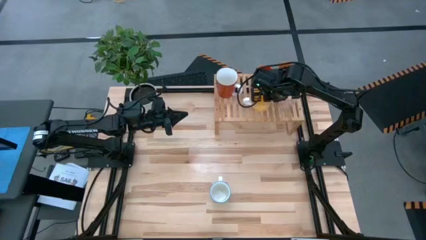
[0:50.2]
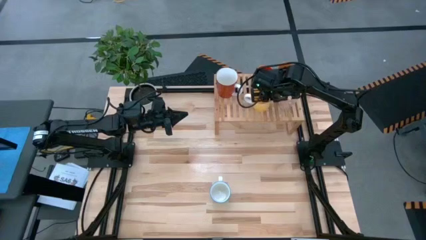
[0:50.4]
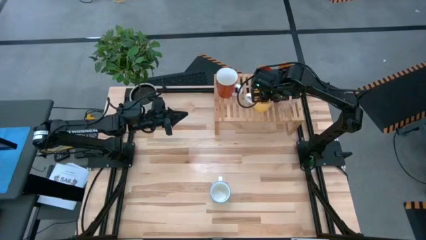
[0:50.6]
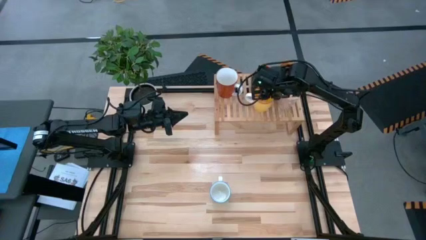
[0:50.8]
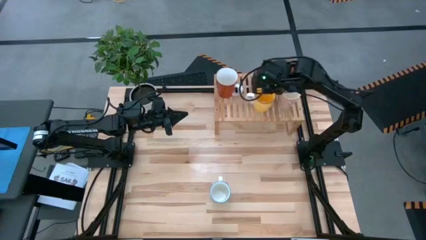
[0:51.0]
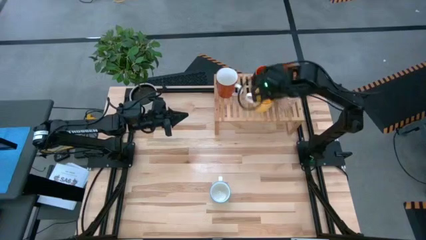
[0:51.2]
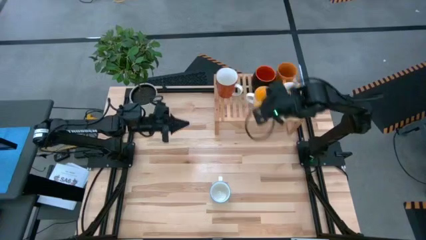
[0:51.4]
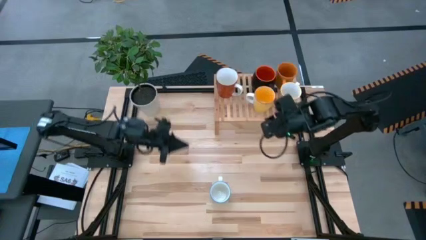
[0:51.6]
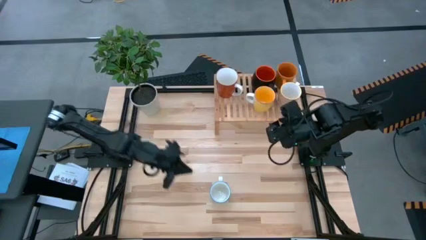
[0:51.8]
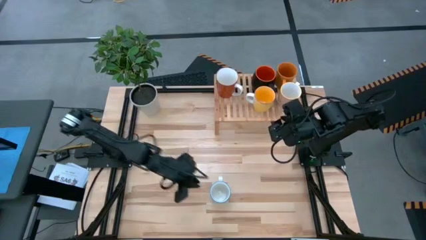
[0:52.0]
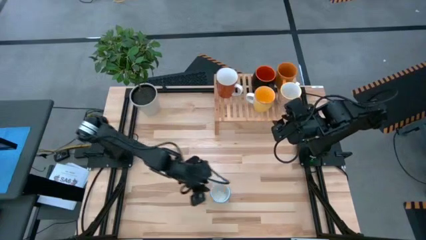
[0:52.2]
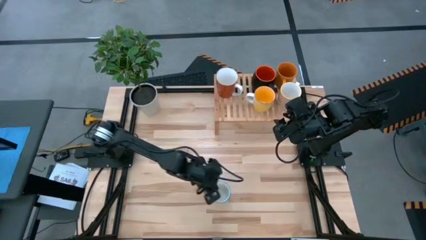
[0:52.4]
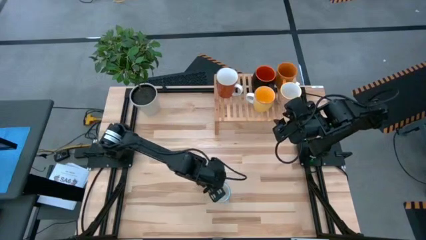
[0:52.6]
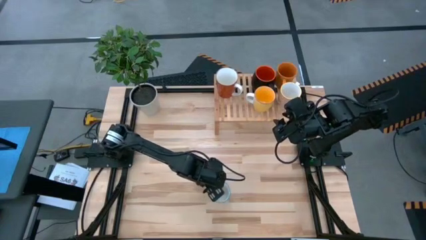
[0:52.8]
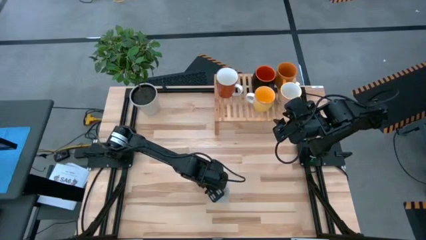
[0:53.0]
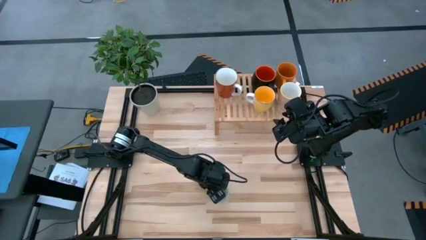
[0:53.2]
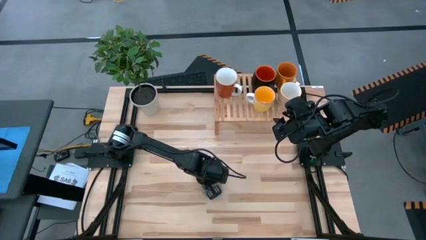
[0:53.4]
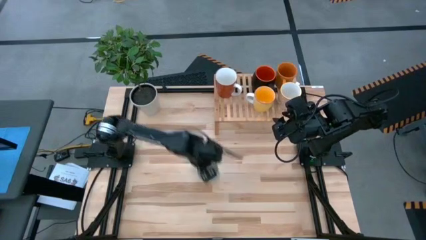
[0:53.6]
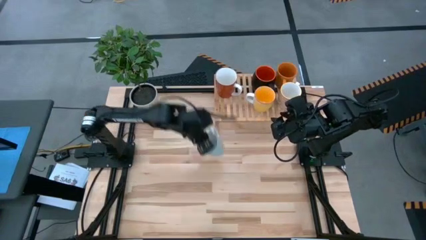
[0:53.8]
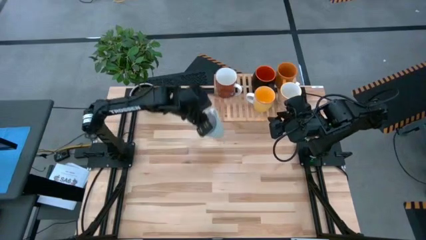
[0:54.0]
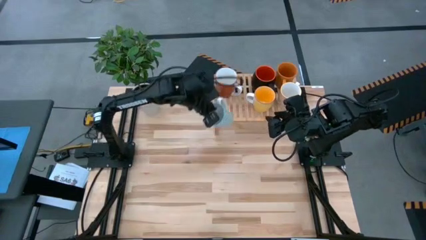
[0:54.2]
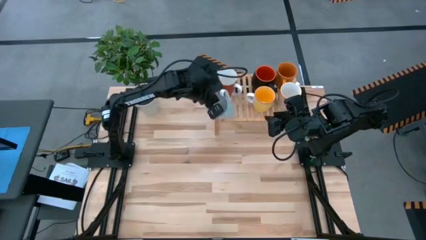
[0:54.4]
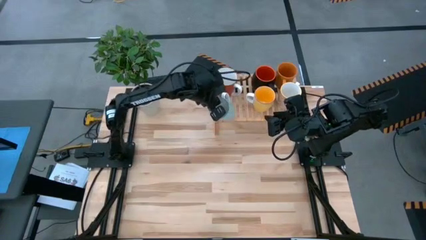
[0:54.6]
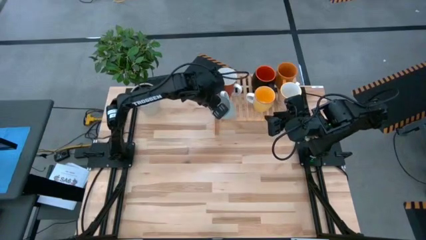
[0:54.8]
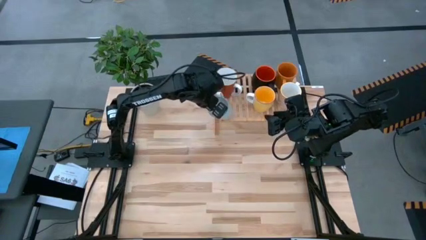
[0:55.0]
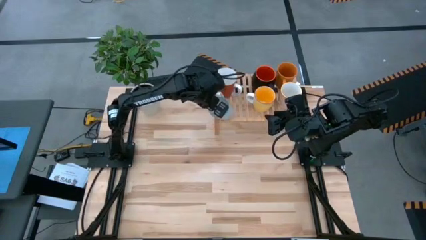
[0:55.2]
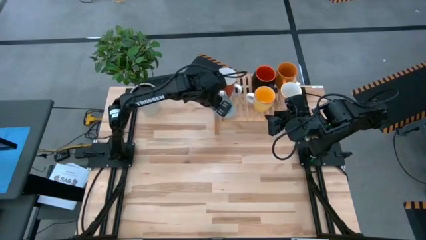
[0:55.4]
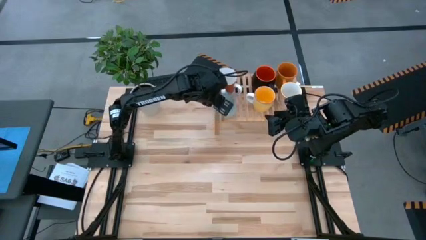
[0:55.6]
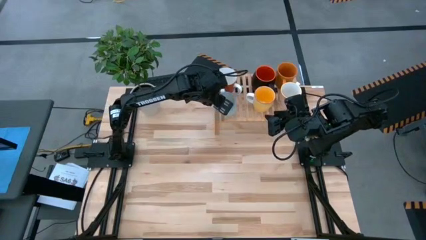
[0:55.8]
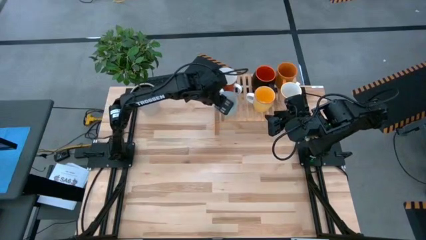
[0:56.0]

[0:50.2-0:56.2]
Task: Place coffee mugs
Put the green patterned mug on the shelf

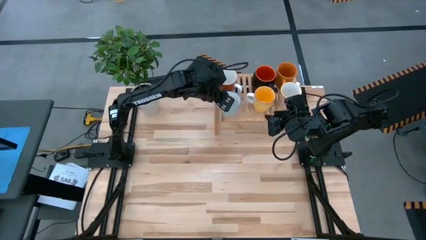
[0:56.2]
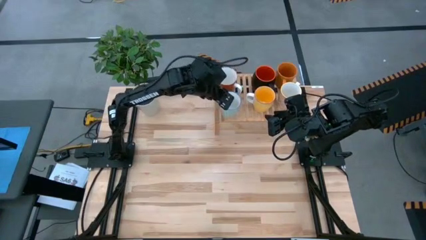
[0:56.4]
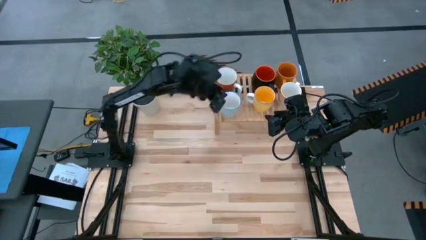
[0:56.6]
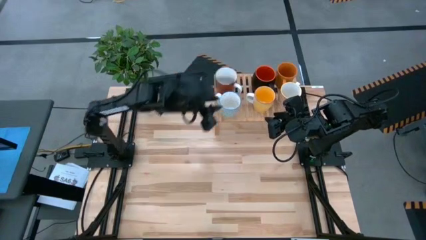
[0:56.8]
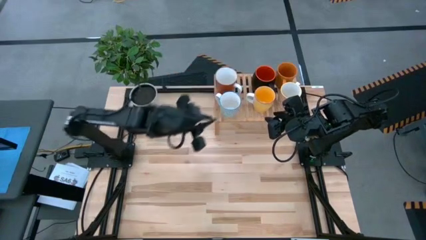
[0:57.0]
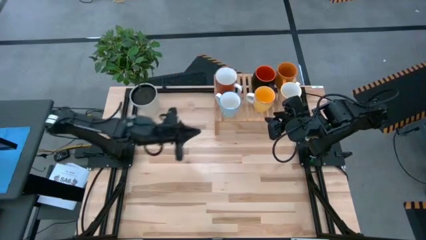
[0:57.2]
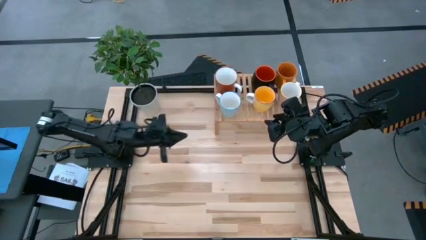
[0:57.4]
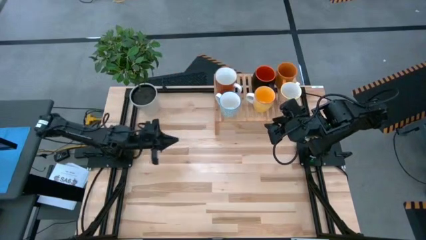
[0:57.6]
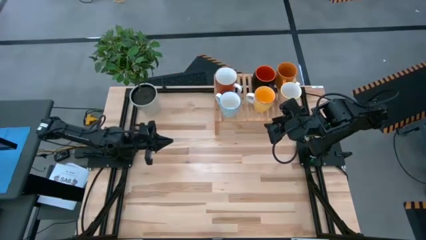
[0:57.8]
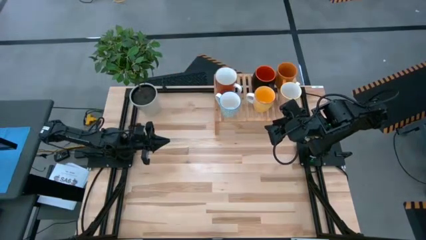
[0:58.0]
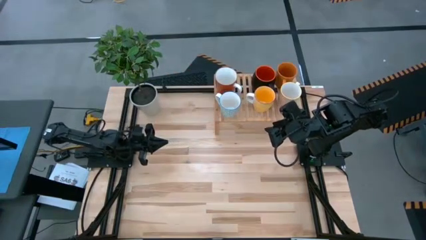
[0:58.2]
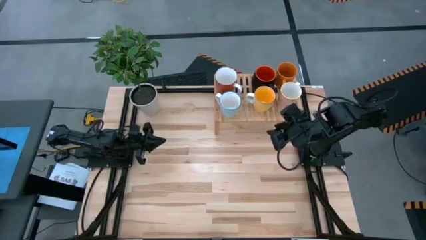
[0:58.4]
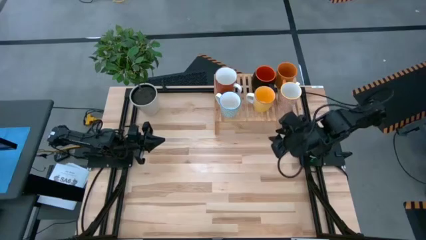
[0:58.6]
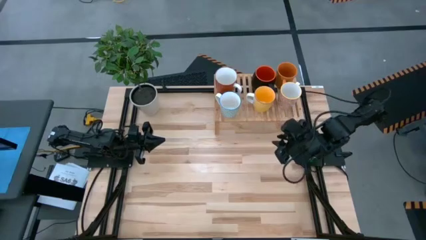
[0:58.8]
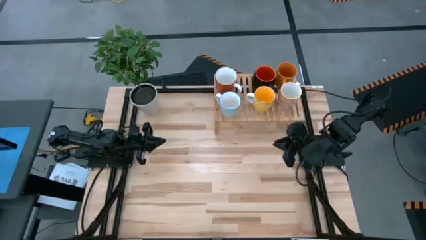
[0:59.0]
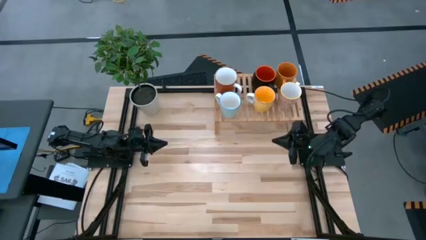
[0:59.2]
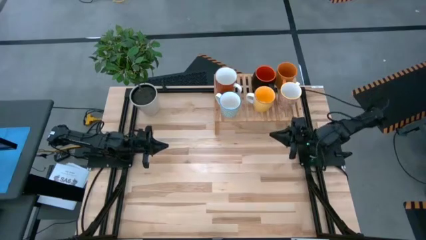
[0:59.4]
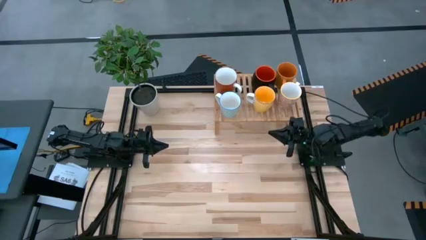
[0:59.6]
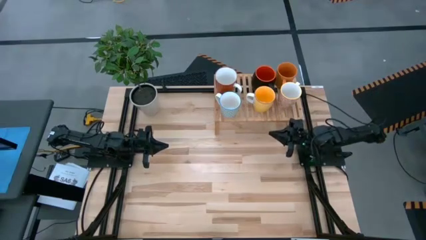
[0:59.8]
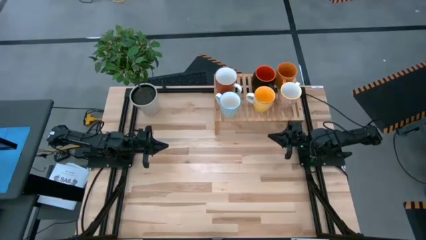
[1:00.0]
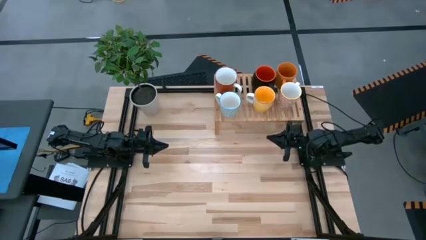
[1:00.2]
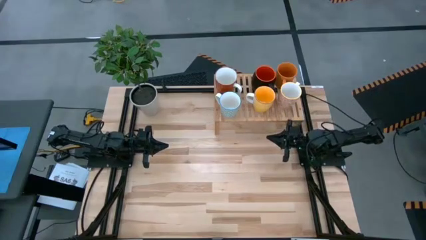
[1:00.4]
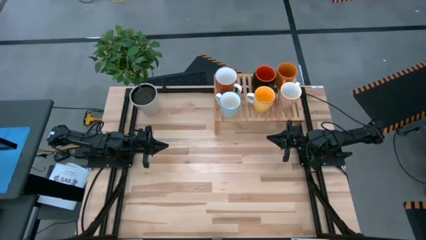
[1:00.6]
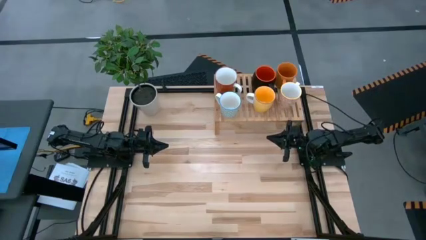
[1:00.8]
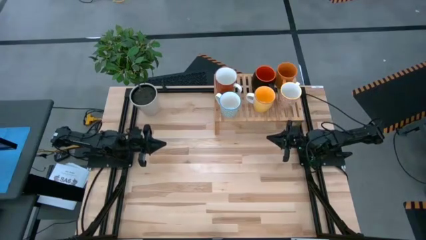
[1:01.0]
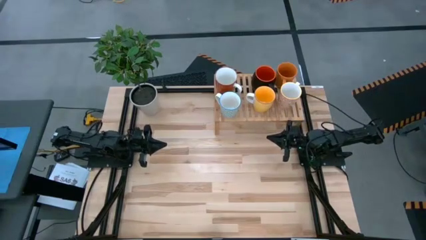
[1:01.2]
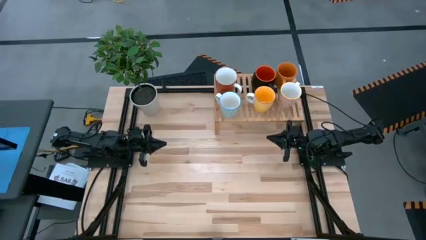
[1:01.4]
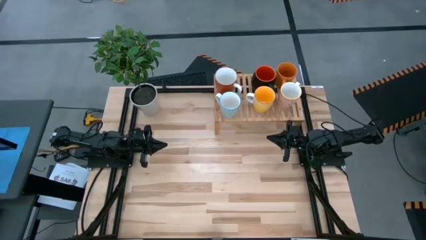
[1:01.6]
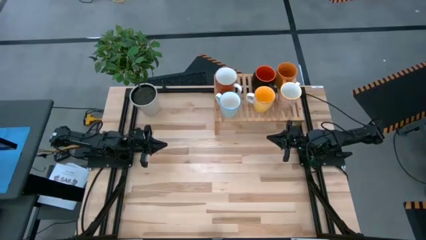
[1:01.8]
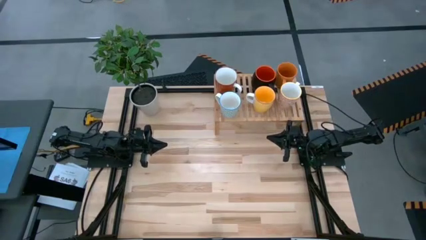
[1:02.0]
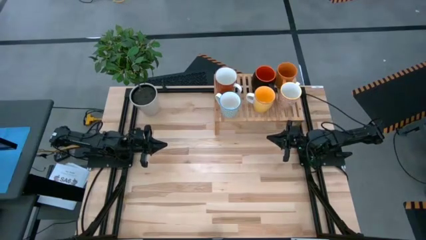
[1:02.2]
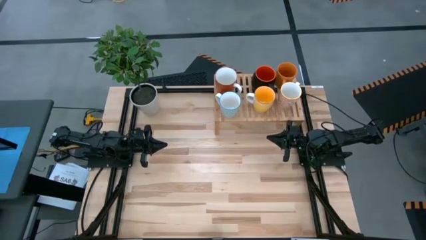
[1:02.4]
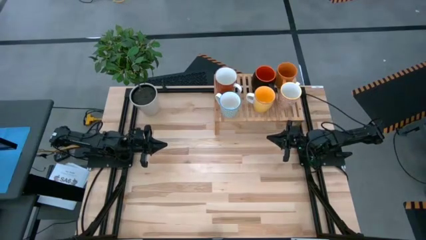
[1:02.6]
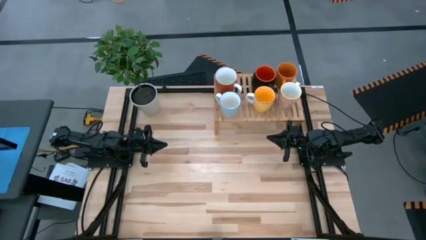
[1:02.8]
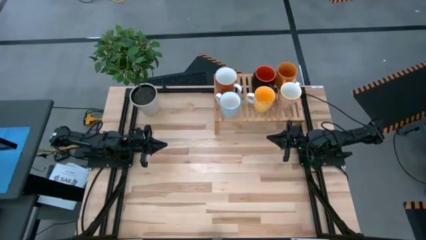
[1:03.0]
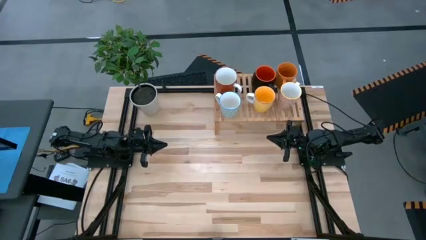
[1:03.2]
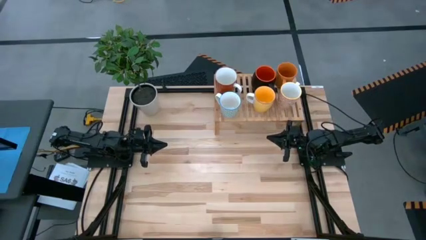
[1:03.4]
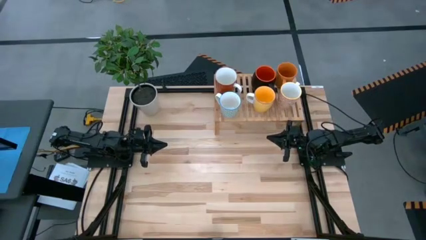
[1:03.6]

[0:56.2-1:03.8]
Return to Home Position
